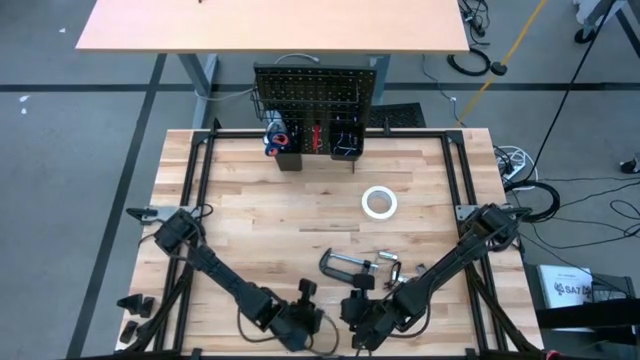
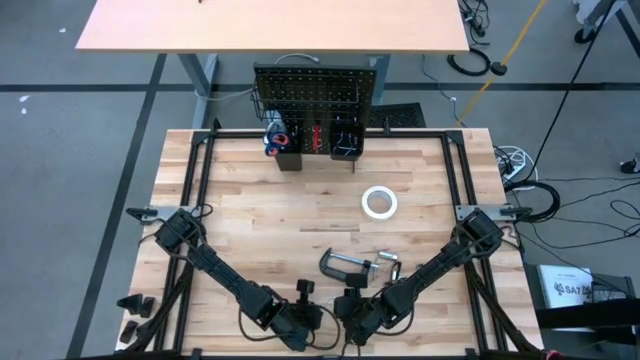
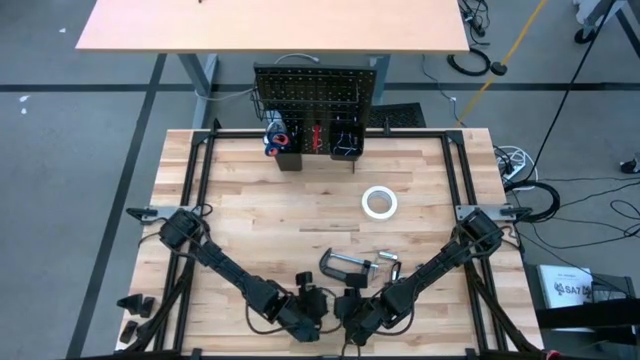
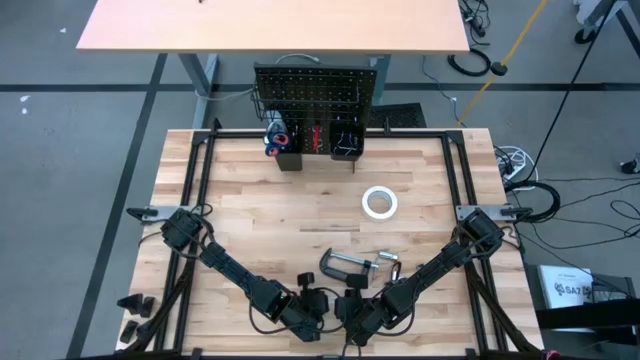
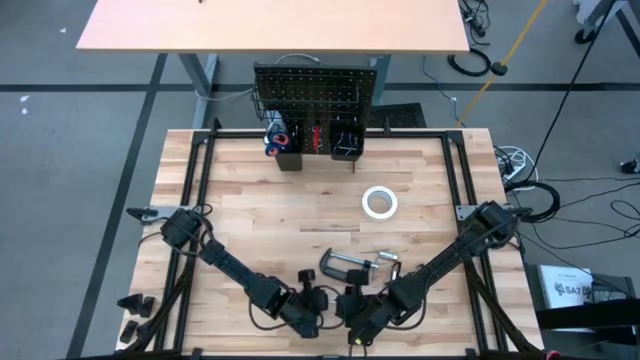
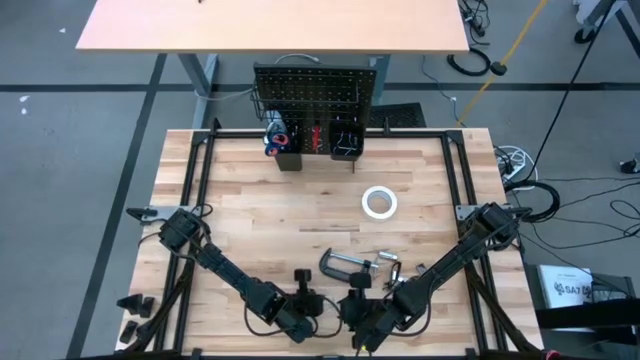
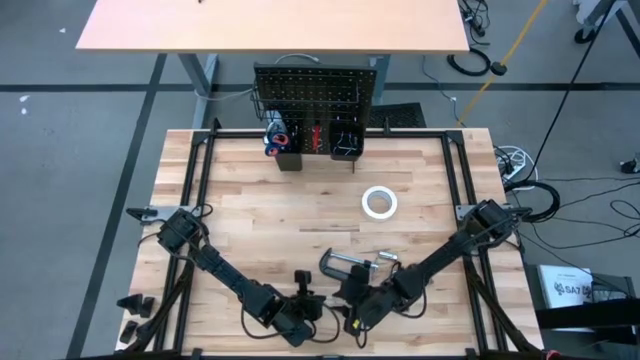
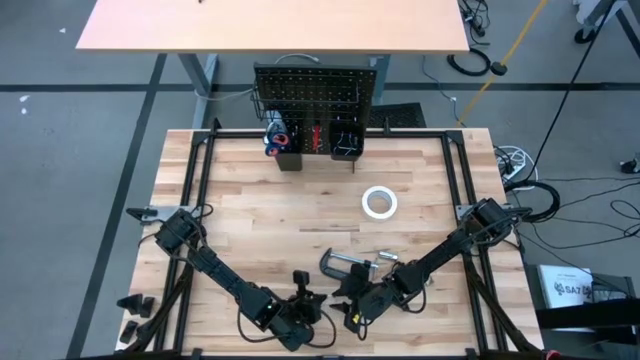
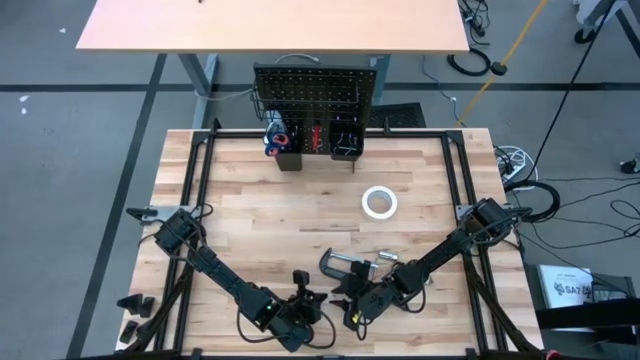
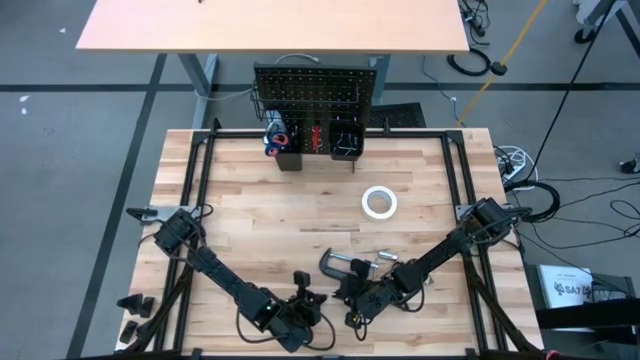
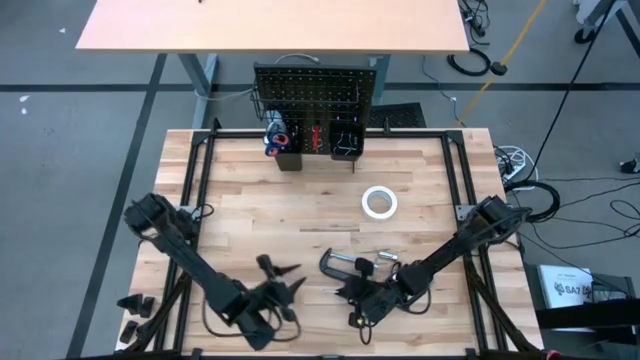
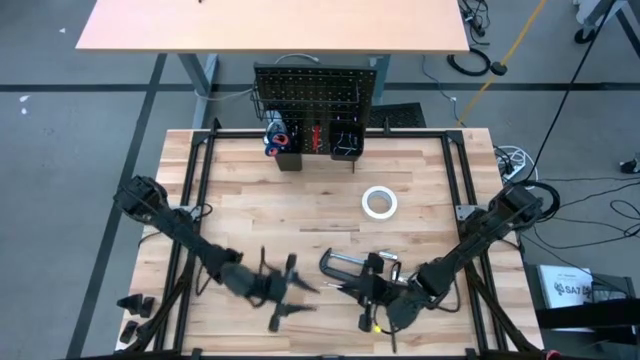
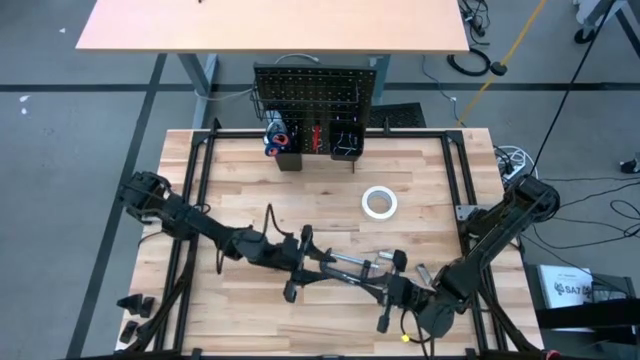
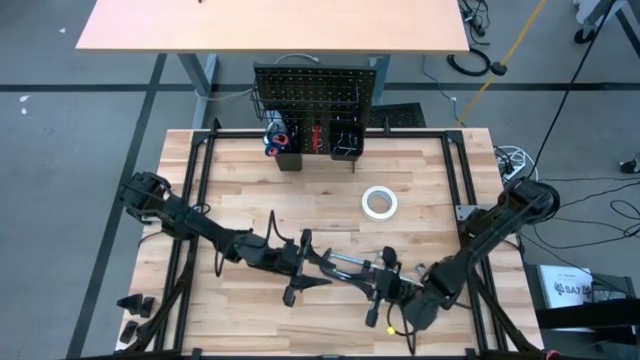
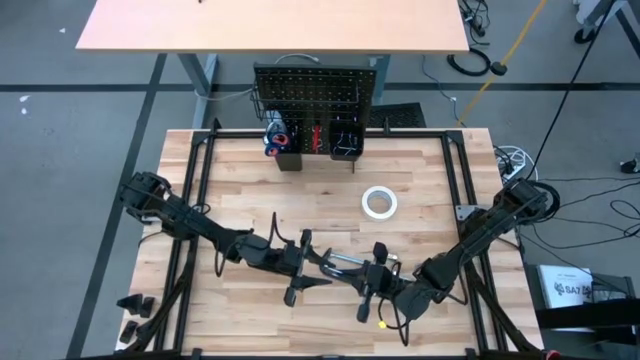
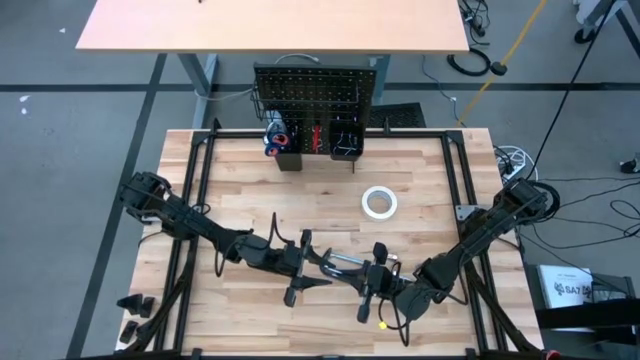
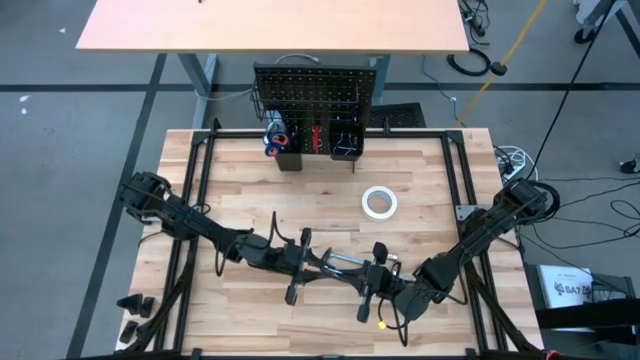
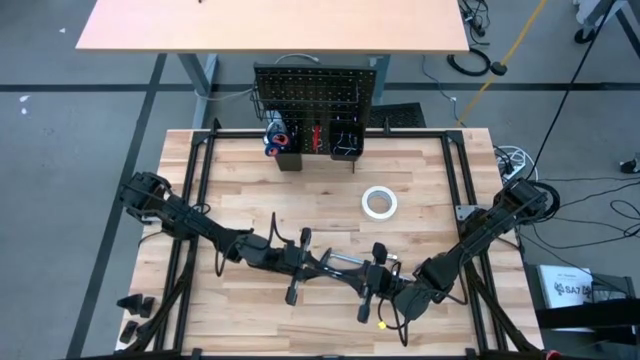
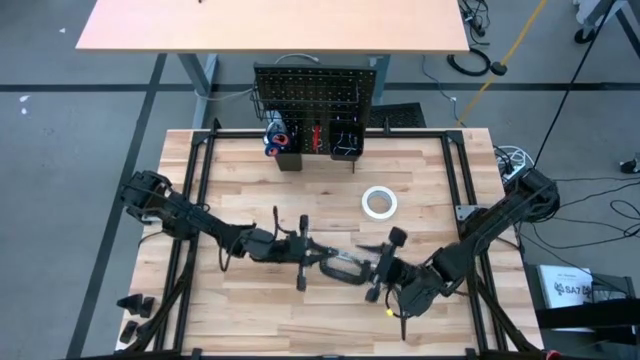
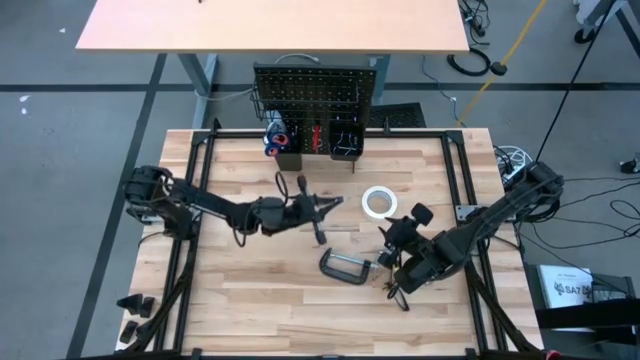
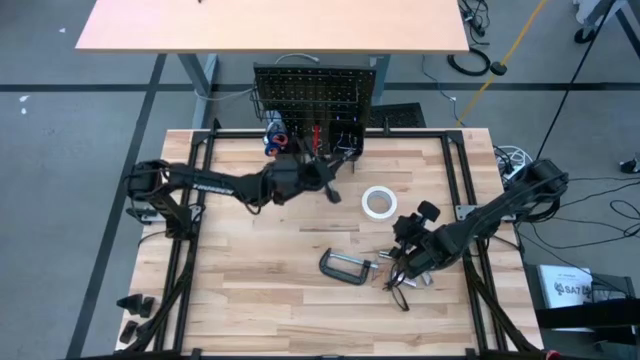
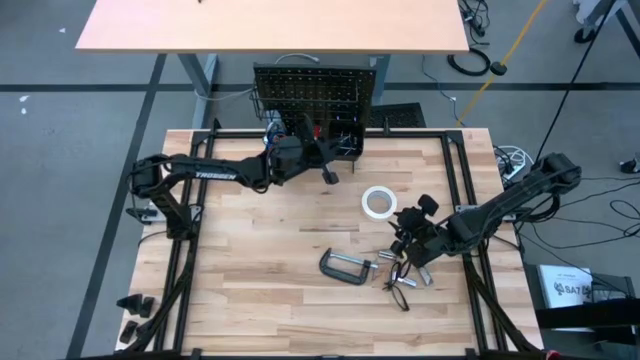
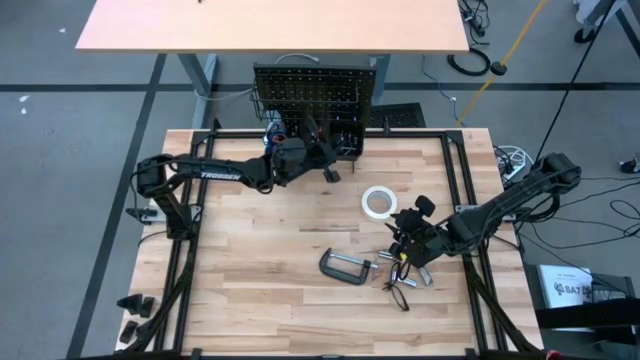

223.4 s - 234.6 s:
Task: Hang tools onto peg board
Put the hanger hook on the right lower deck of the pegboard

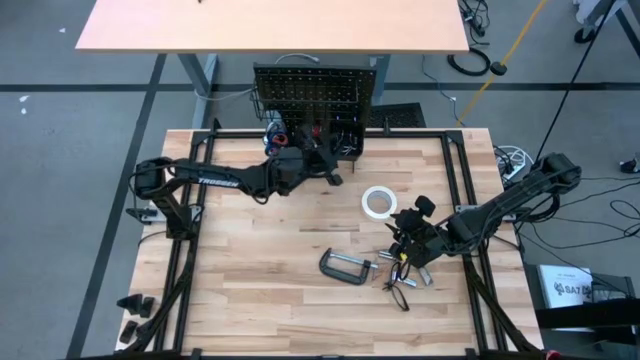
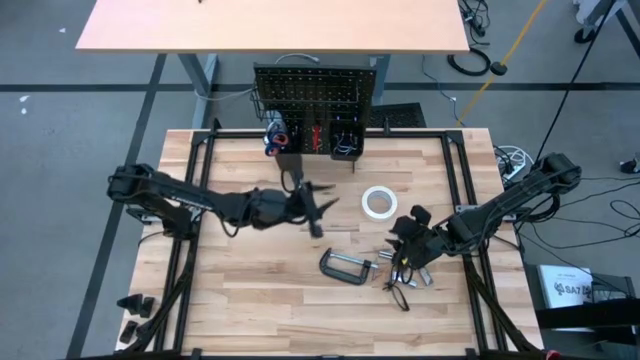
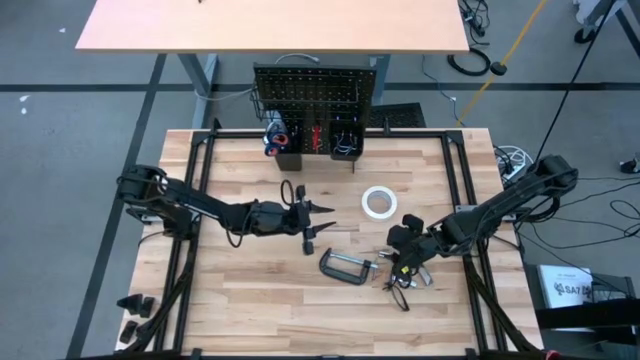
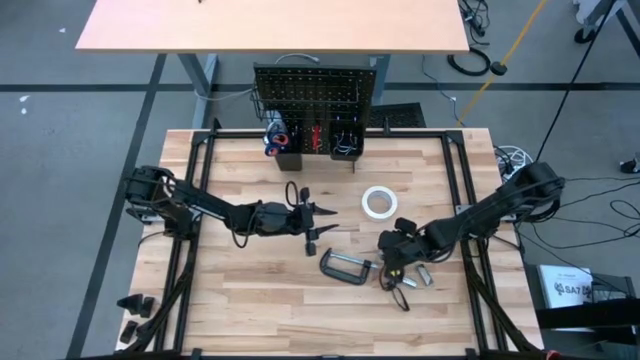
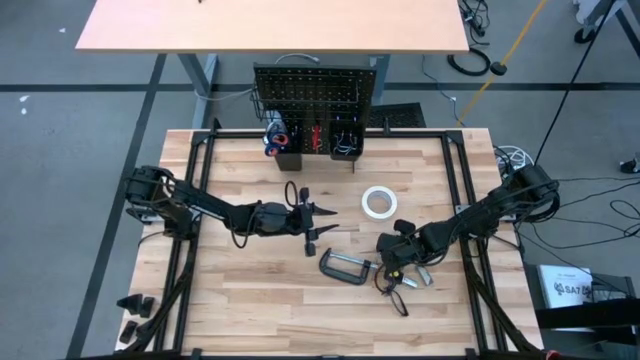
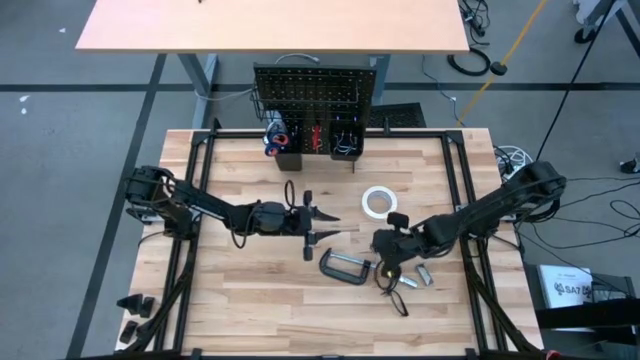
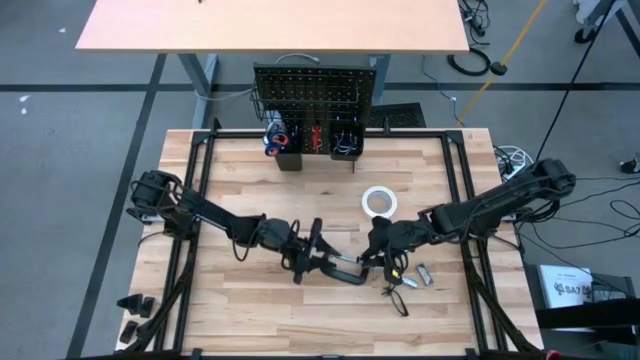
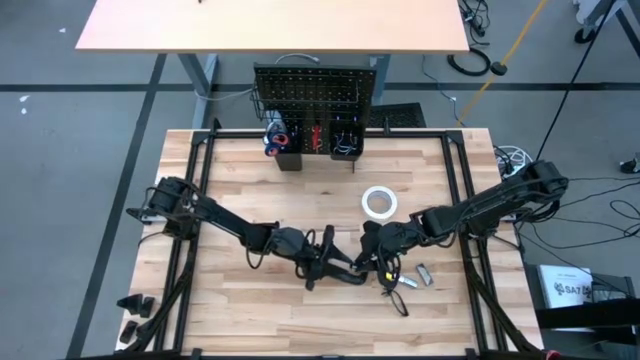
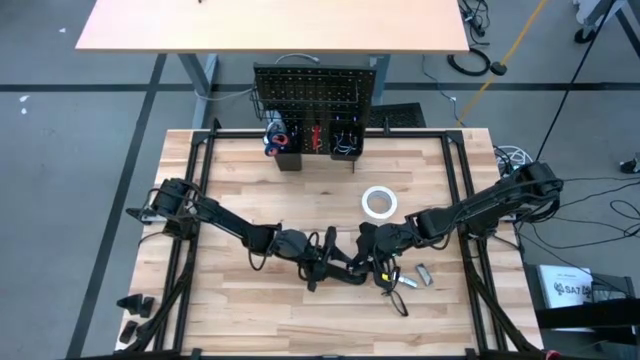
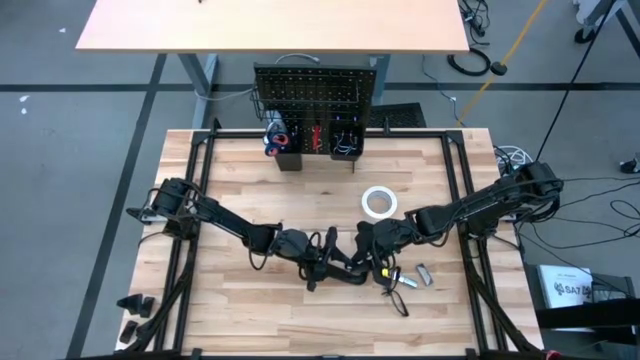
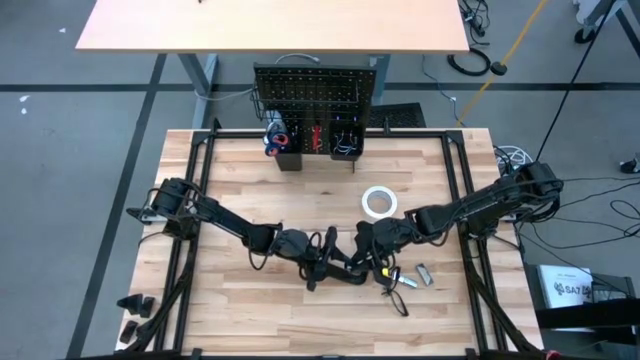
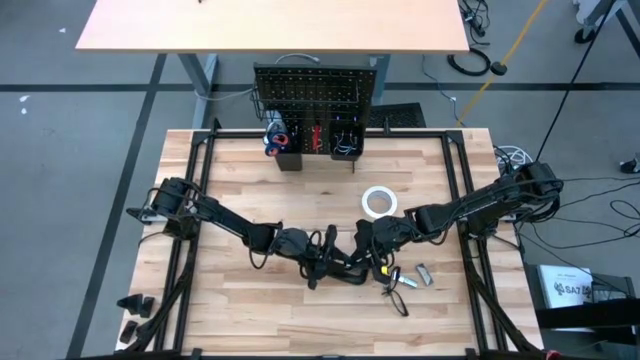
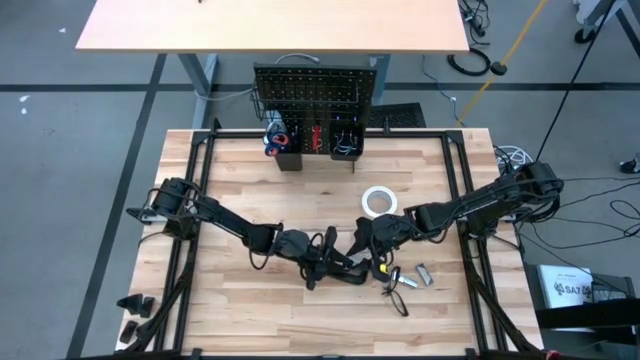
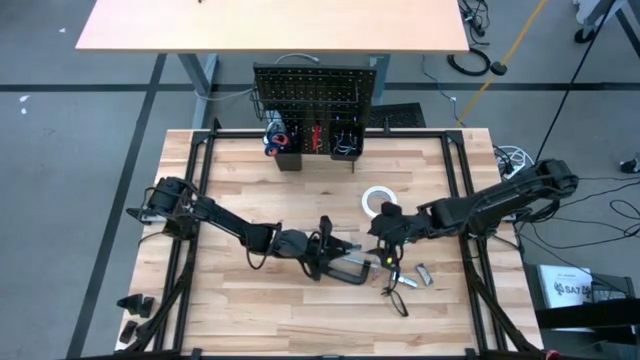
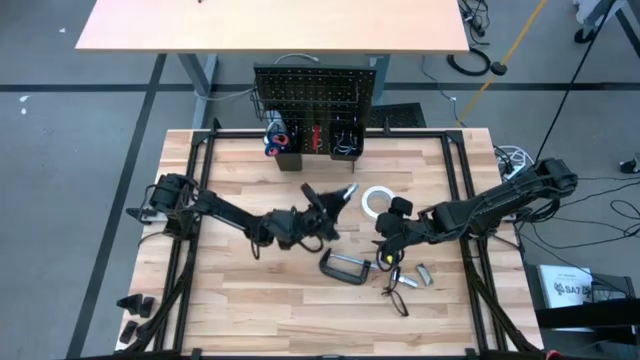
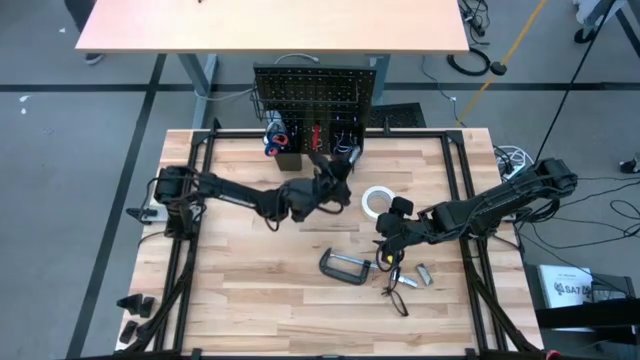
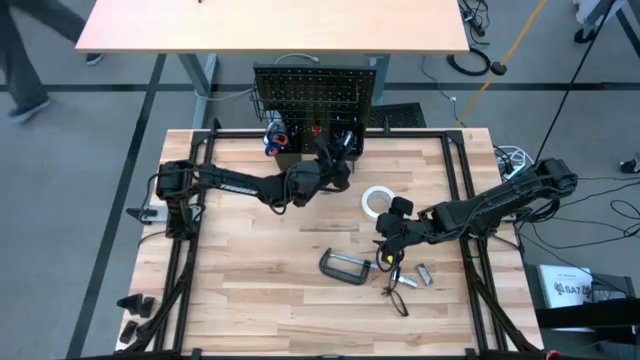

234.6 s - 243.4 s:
Put the socket on the right lower deck of the pegboard
